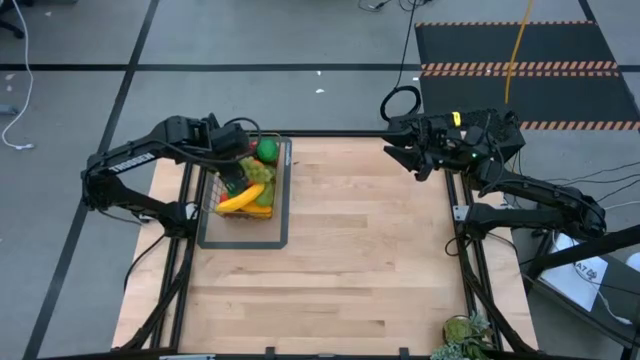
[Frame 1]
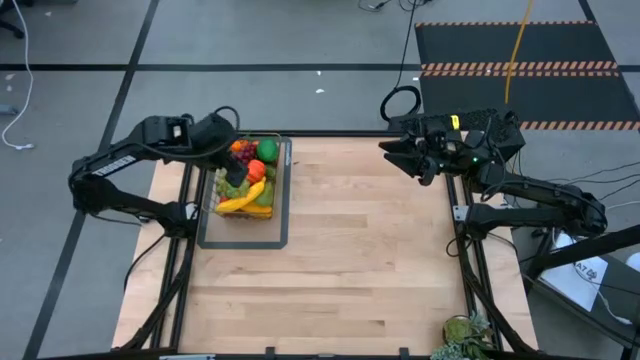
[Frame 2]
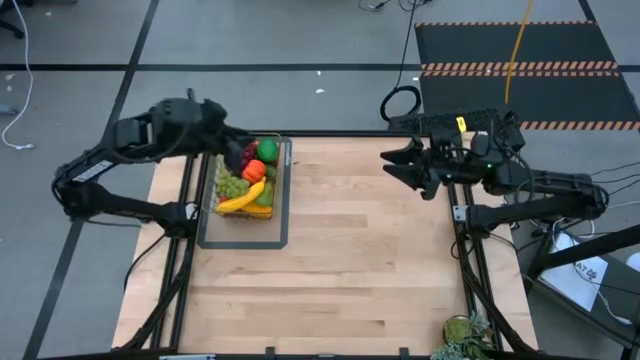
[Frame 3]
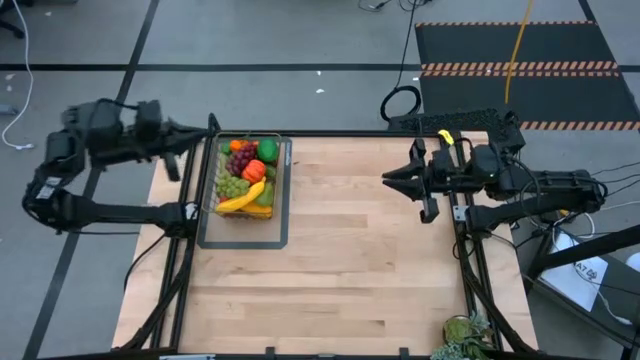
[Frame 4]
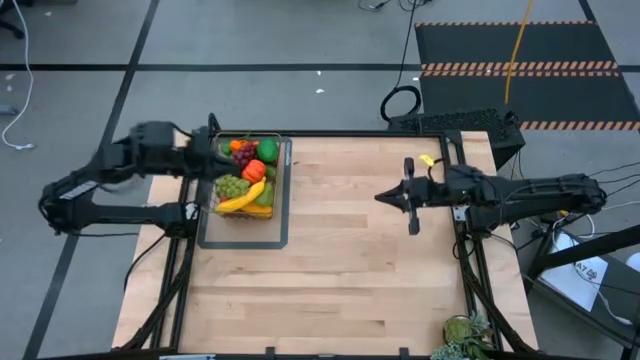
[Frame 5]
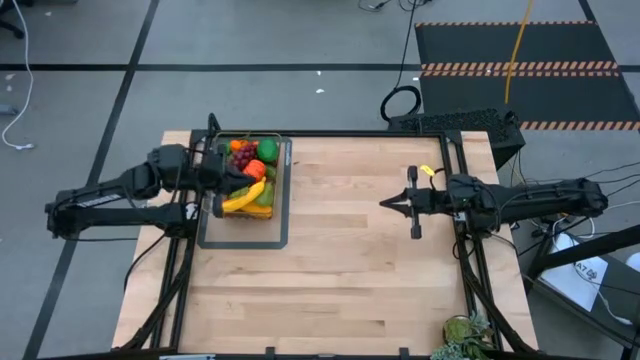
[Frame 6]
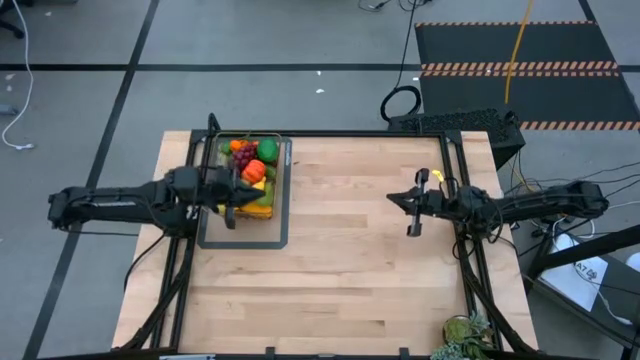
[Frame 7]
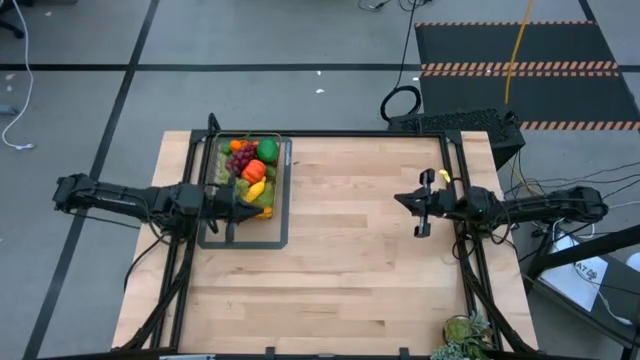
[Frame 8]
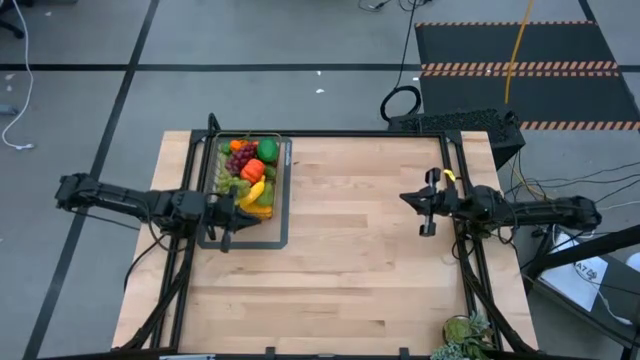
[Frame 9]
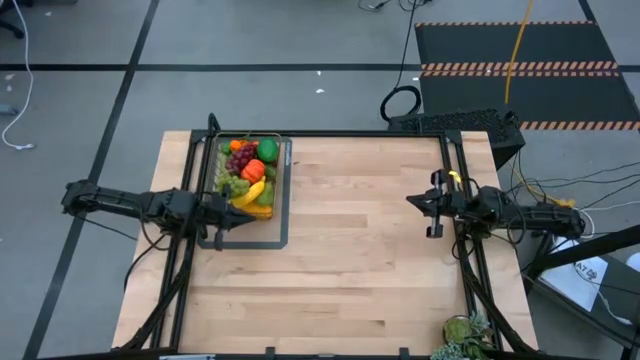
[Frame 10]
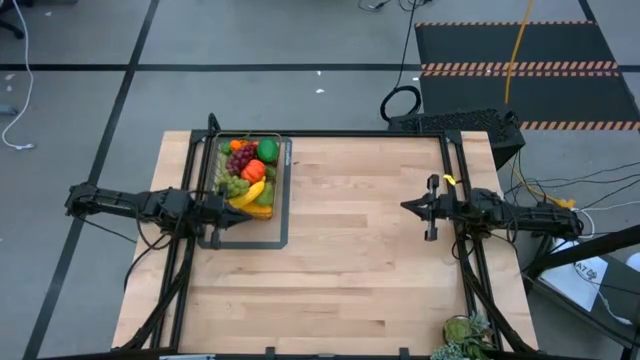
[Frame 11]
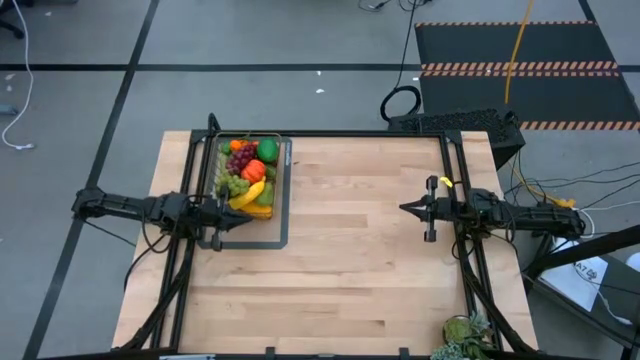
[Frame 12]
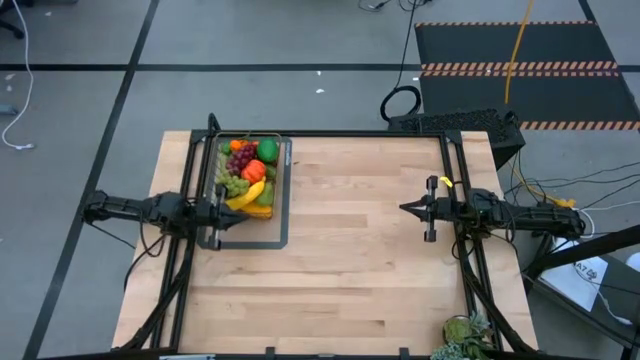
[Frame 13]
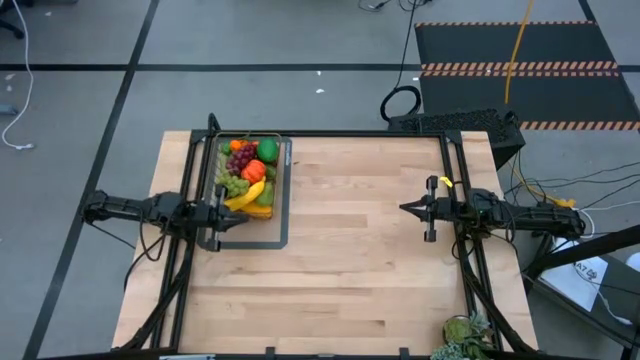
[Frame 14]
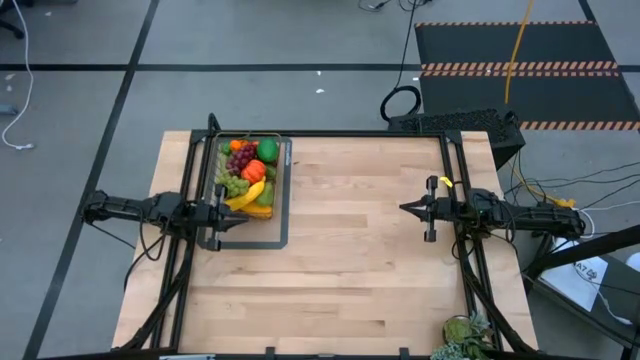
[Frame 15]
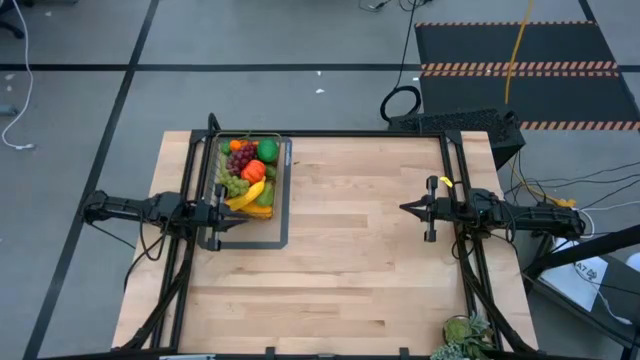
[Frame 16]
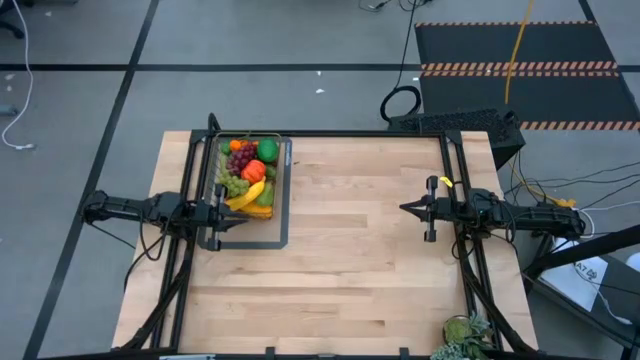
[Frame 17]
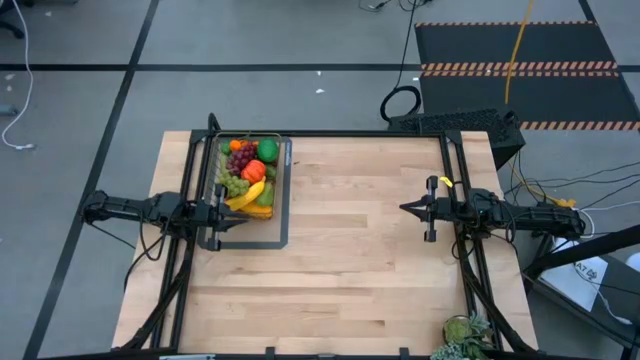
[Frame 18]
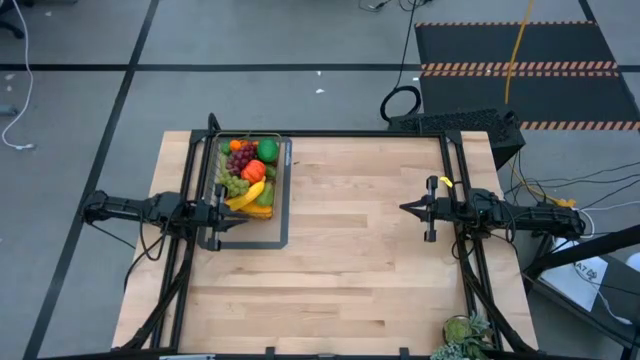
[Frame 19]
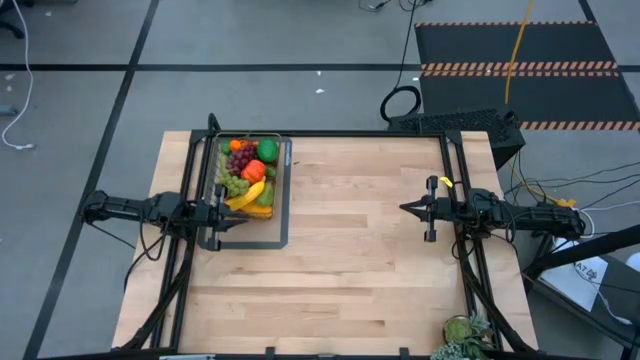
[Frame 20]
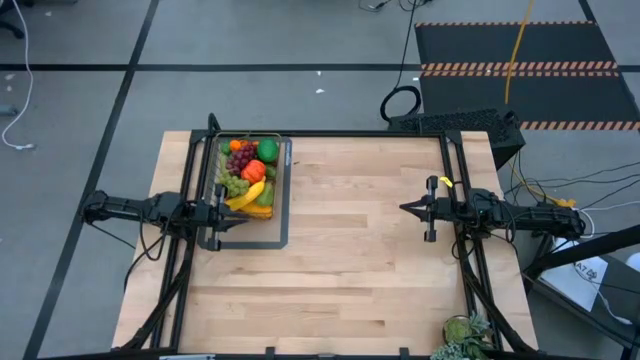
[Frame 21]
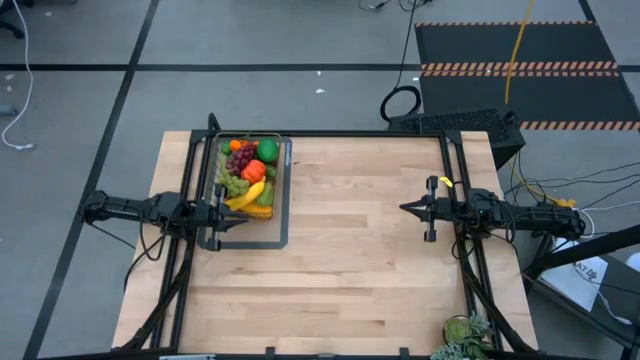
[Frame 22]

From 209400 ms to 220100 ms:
Task: Build produce basket
Return to Home Position

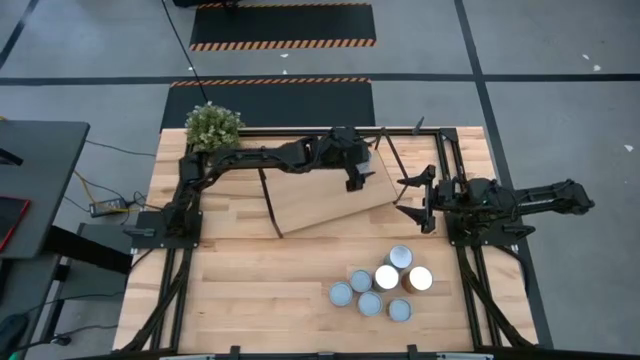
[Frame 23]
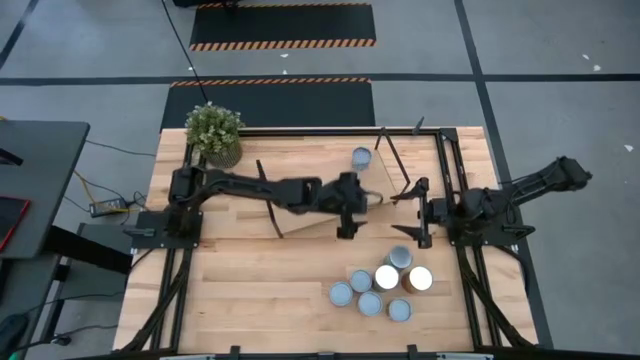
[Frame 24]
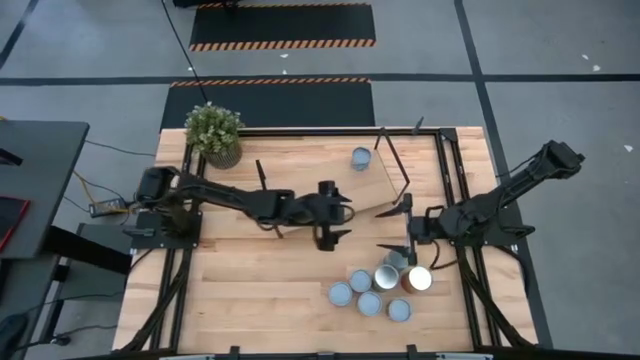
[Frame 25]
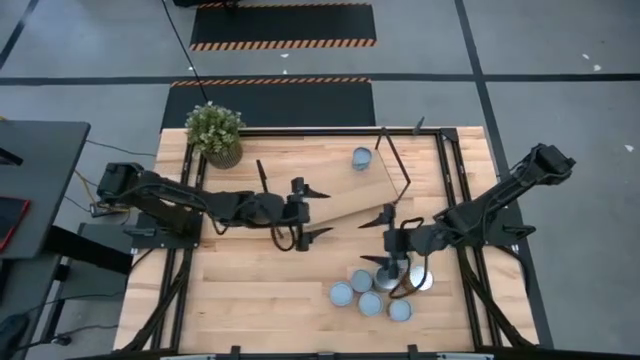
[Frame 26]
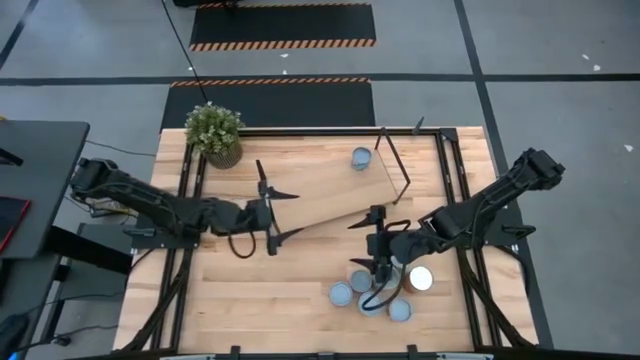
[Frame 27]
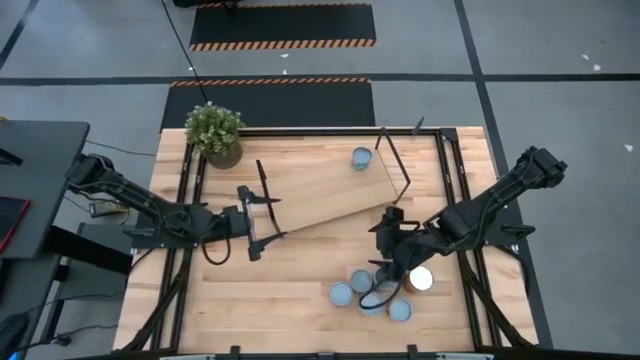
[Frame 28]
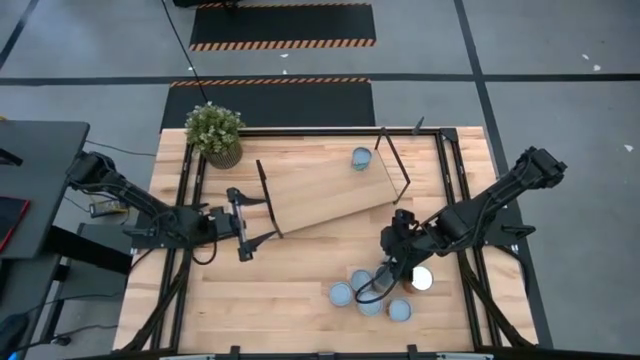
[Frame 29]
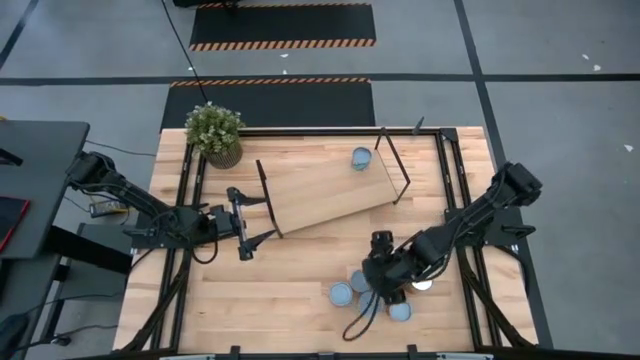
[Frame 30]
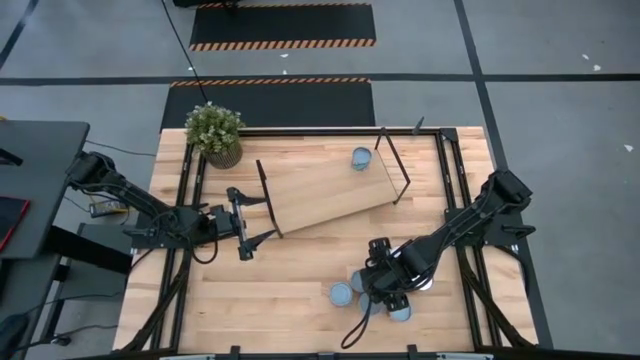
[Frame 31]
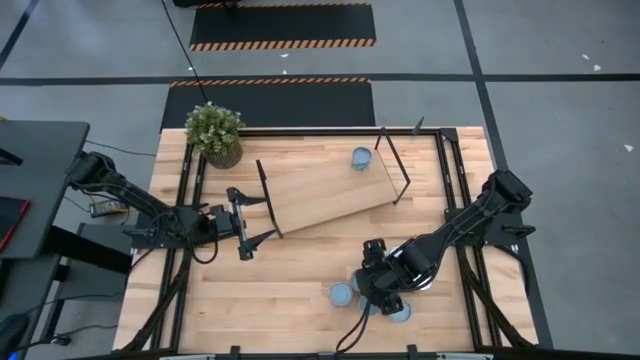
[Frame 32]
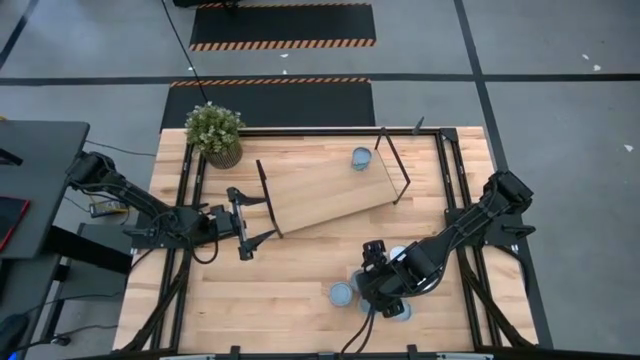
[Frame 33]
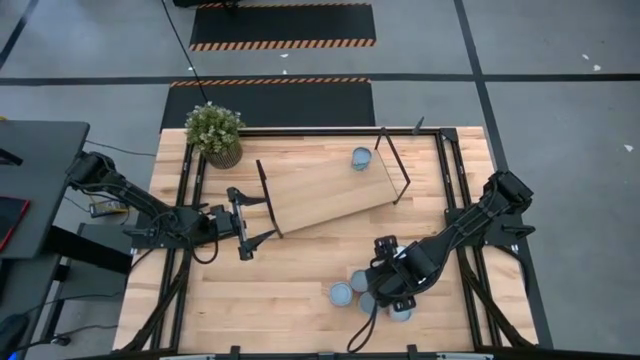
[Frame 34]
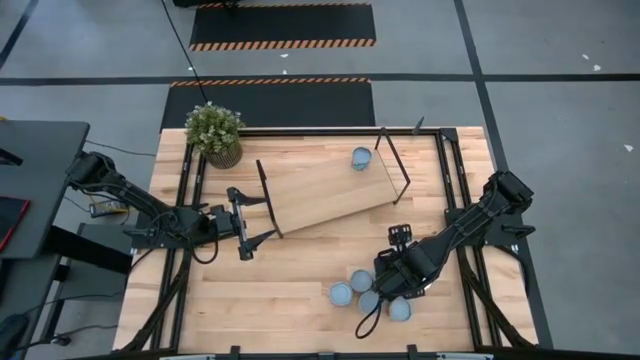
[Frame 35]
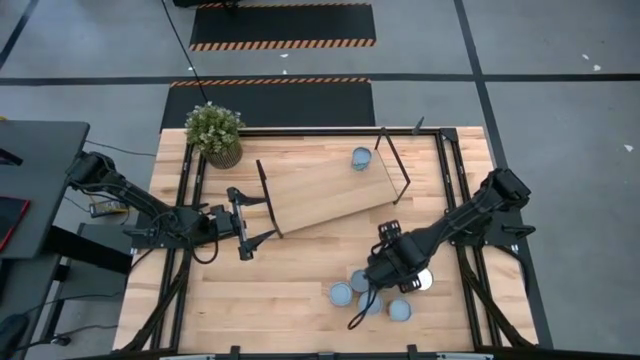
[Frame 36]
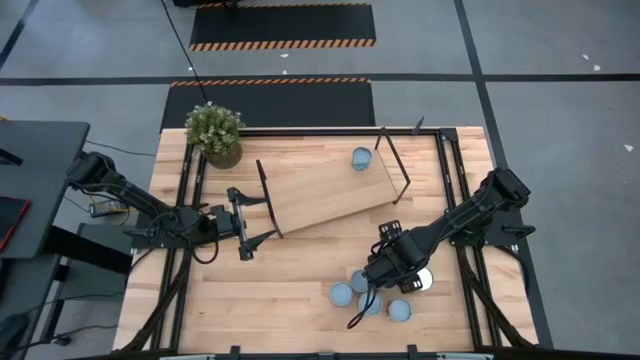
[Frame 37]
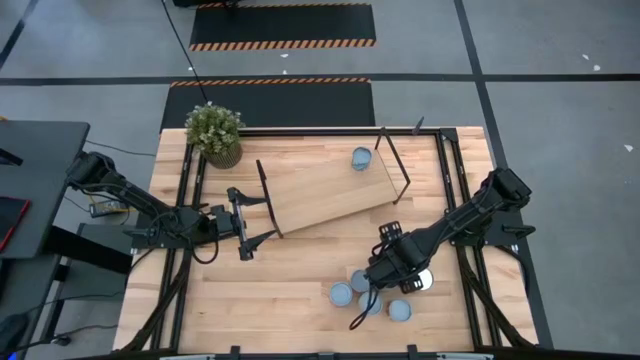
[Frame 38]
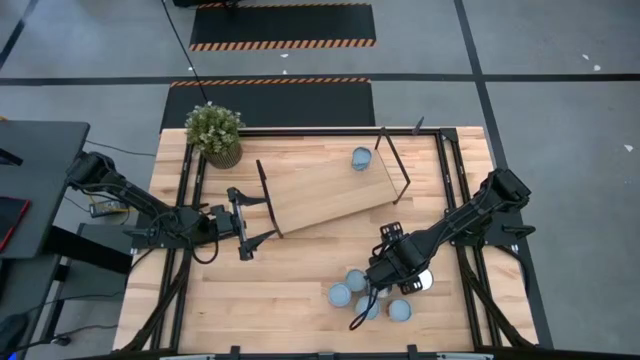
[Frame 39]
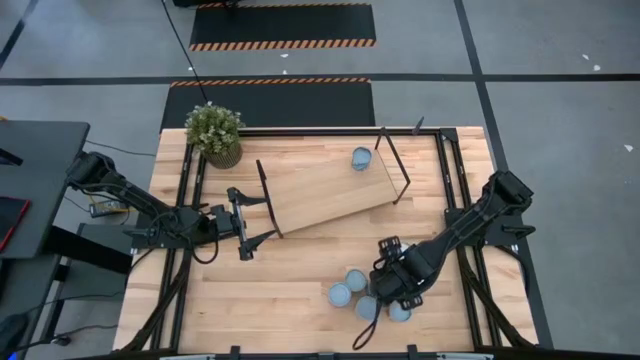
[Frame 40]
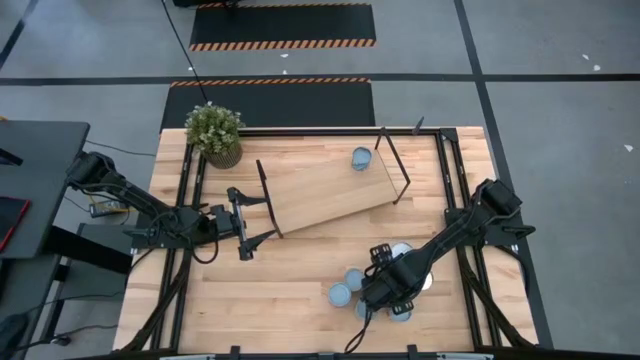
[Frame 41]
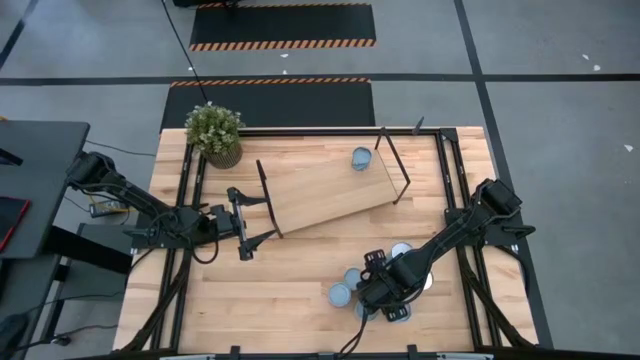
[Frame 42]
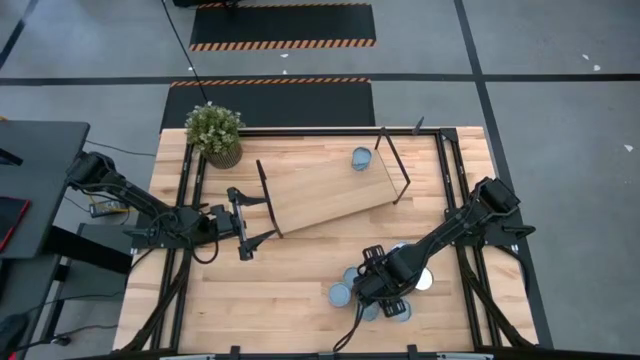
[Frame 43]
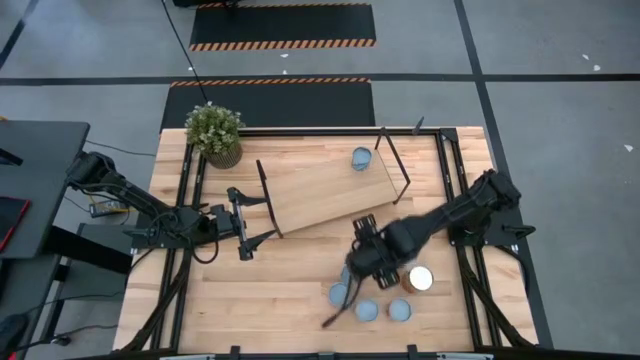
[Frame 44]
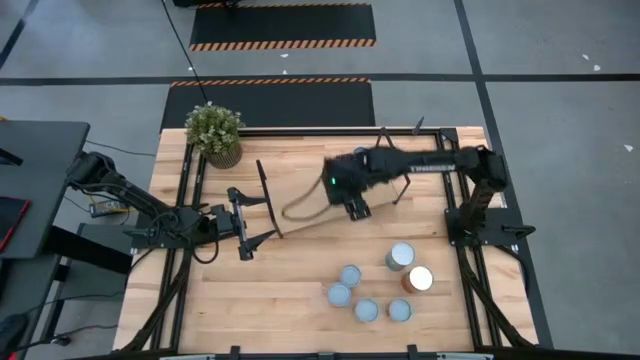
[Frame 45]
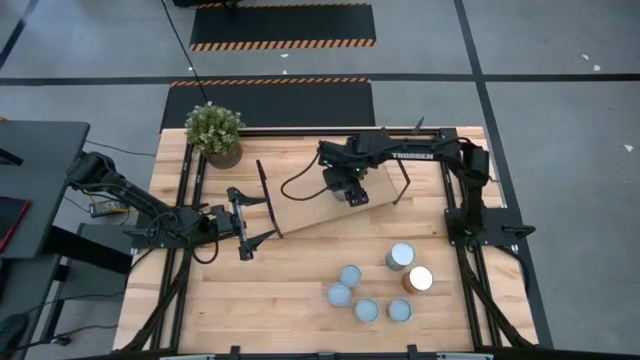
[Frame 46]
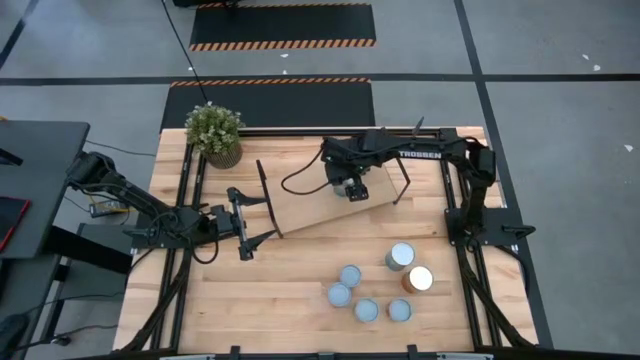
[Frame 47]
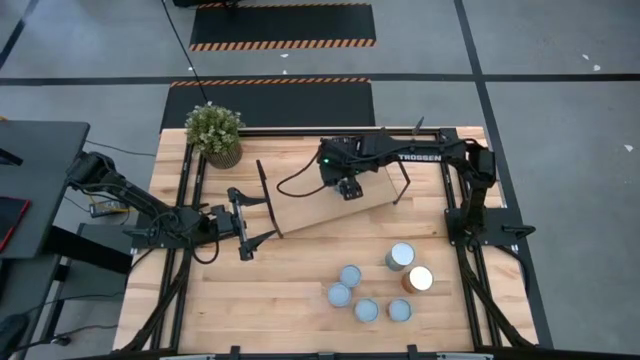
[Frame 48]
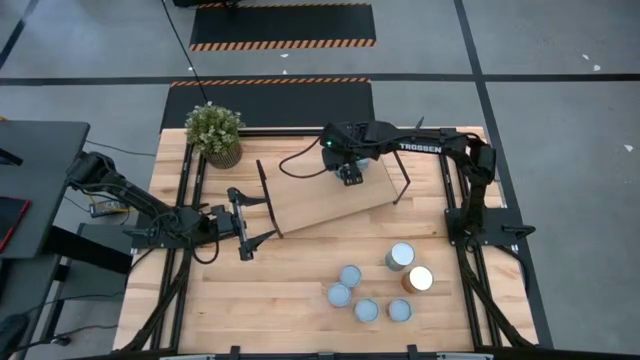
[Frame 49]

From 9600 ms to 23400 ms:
Task: Pick and place cans onto a shelf
Put the blue can on the shelf
